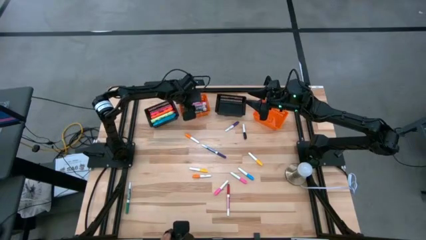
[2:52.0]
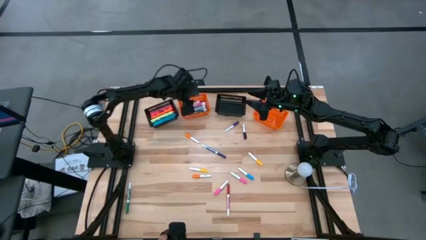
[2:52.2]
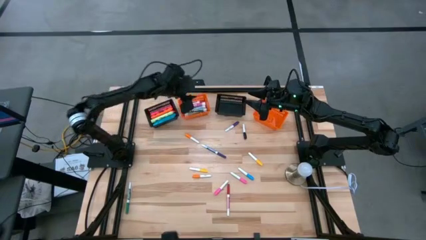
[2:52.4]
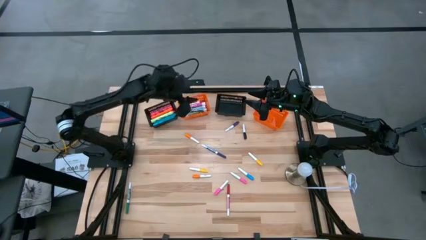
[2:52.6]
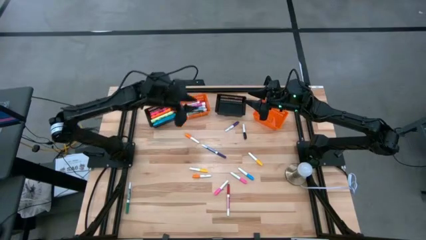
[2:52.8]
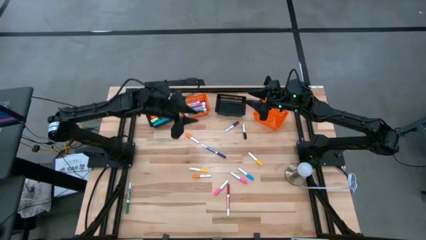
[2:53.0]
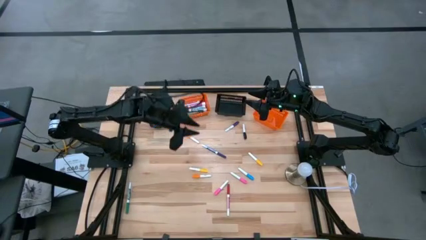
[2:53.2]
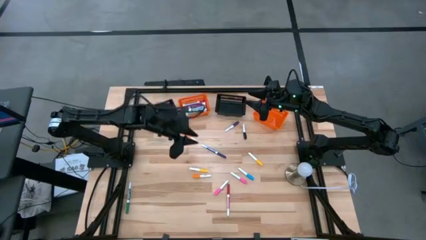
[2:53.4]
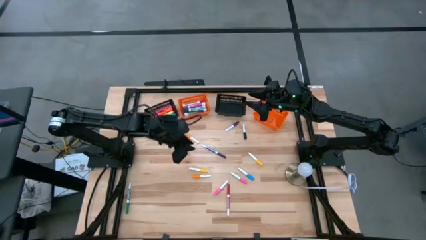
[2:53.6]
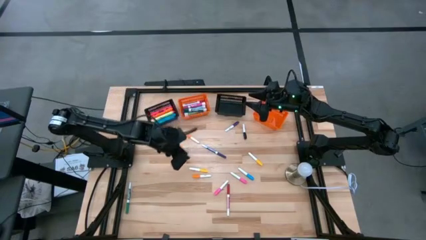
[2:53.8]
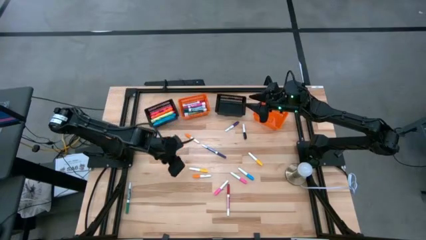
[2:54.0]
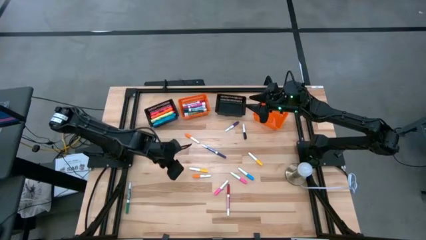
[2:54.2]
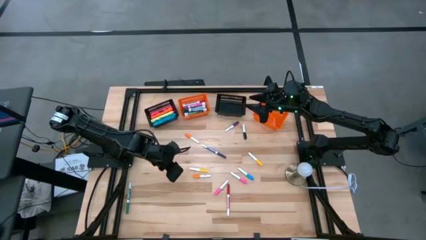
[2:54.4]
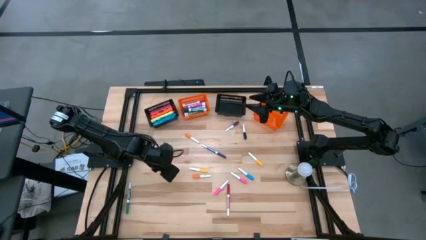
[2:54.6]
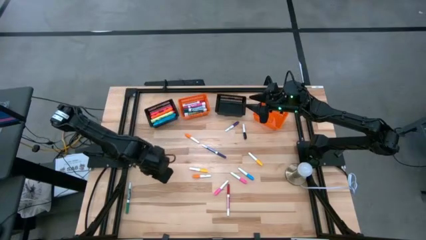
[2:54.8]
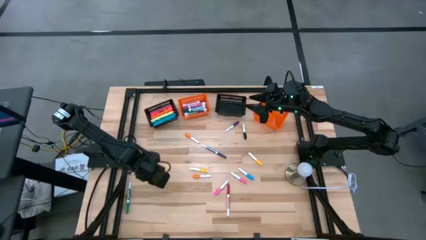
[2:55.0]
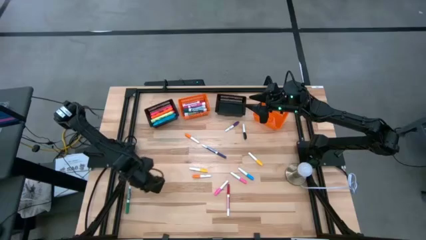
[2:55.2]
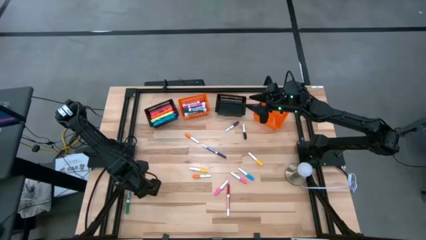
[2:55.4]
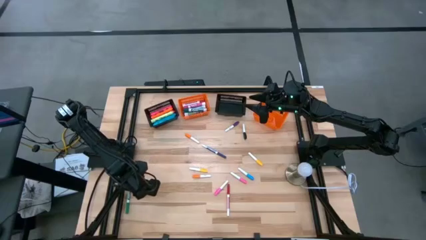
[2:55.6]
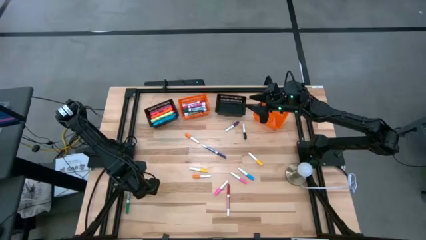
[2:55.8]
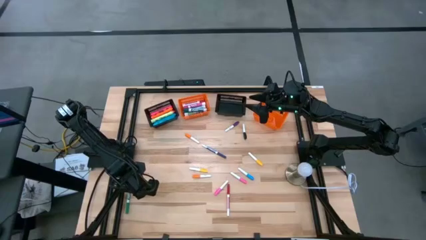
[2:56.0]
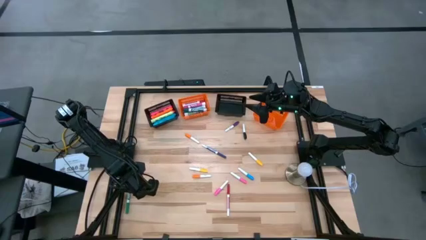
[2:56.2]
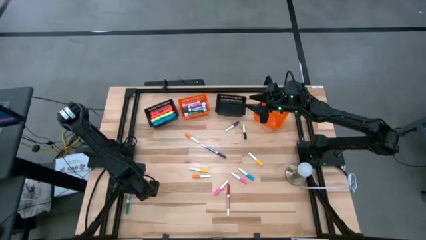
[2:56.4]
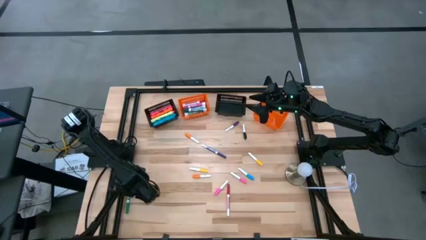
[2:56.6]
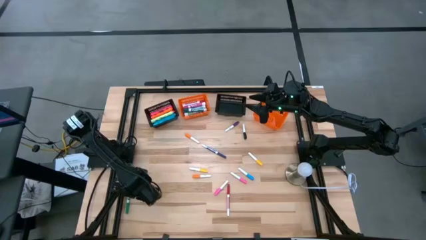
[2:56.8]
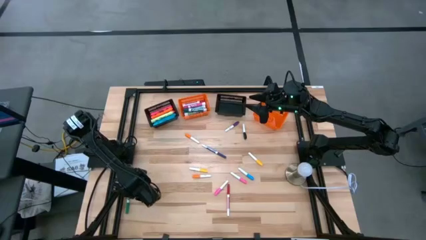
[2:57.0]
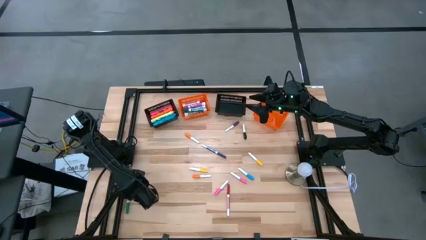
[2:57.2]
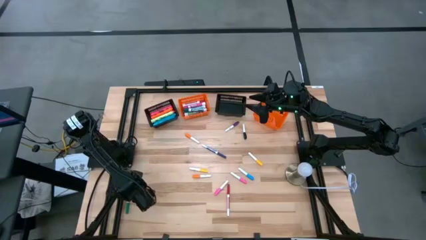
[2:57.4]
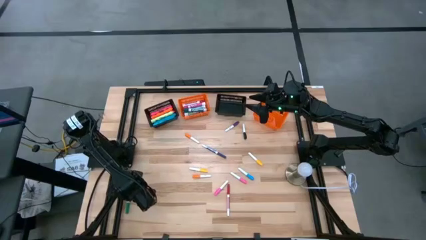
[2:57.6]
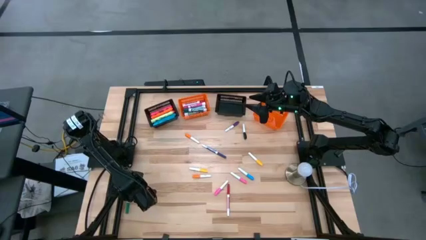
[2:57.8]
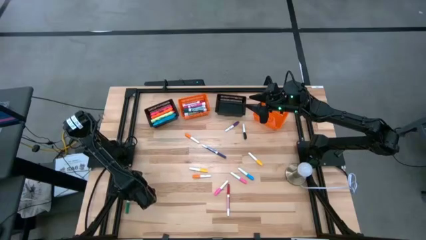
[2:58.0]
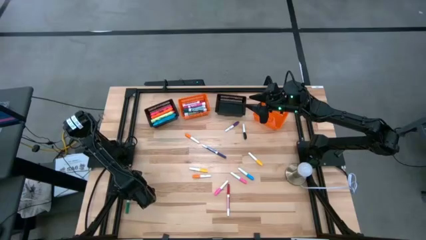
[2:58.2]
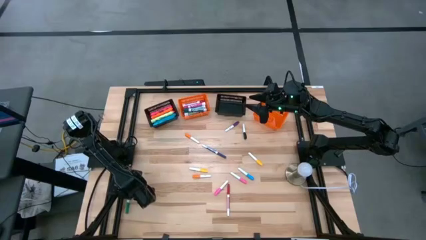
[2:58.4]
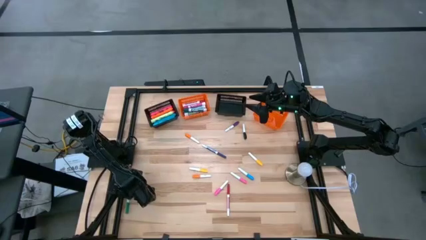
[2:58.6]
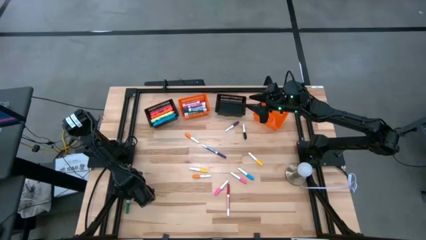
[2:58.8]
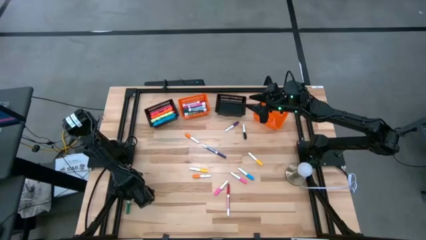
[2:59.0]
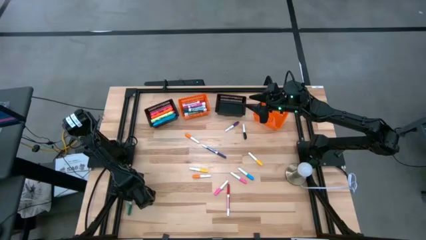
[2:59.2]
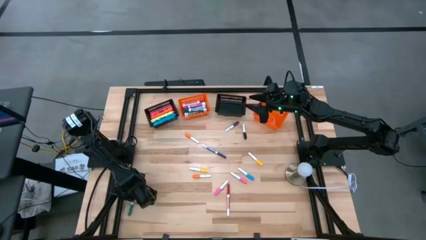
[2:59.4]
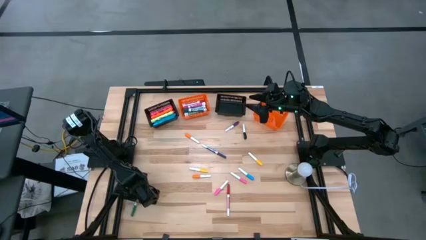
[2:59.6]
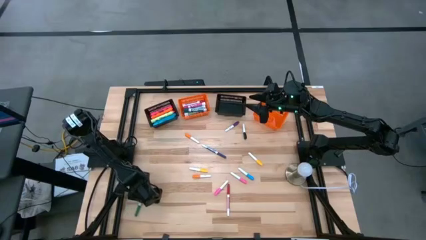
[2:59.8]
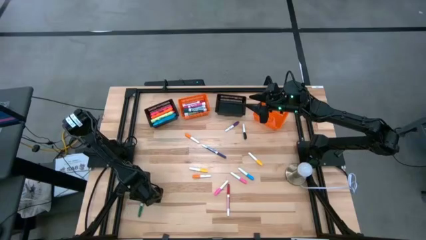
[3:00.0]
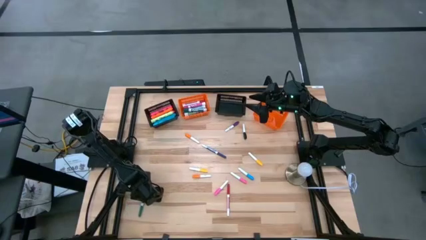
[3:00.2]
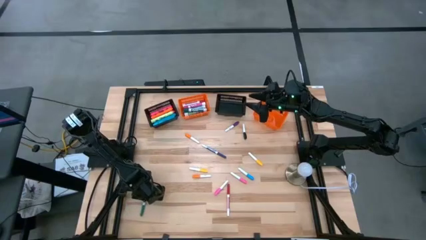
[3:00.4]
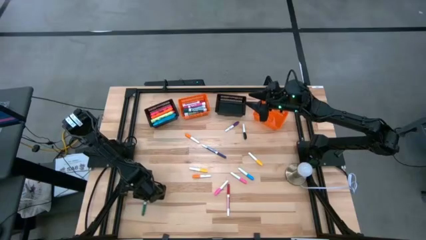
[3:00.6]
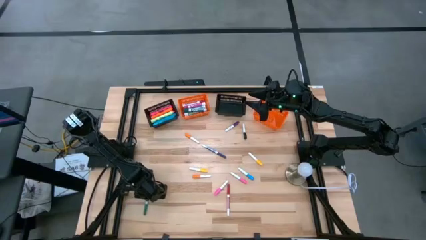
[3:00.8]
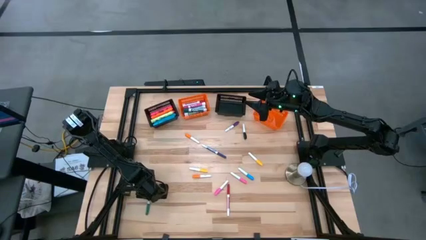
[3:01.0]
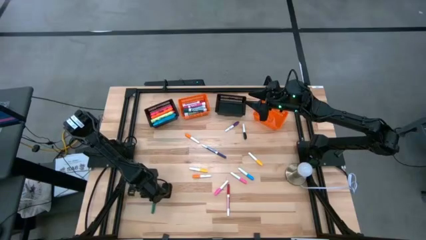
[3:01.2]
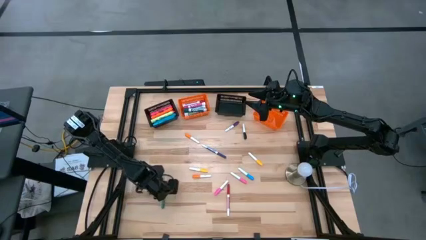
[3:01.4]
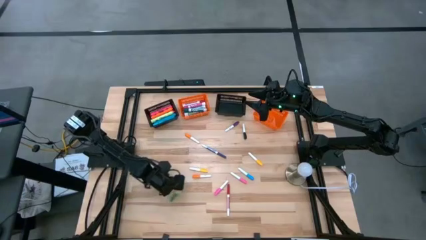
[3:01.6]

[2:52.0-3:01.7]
Task: Pick & Place Markers
Put the green marker pen into the right black bin

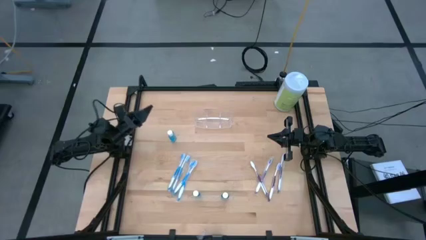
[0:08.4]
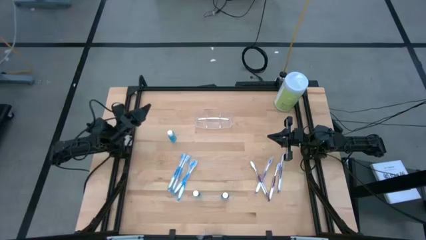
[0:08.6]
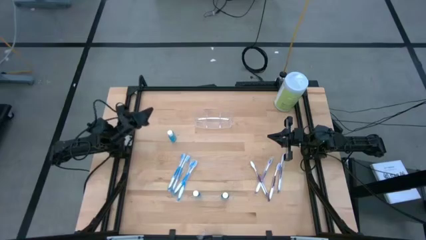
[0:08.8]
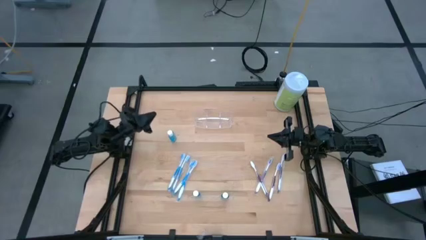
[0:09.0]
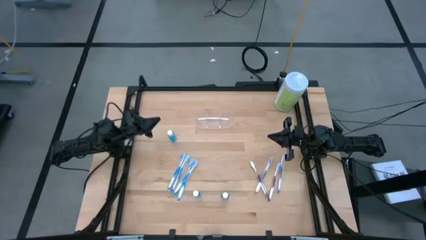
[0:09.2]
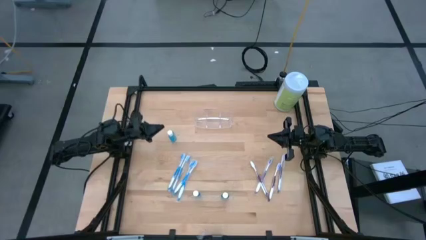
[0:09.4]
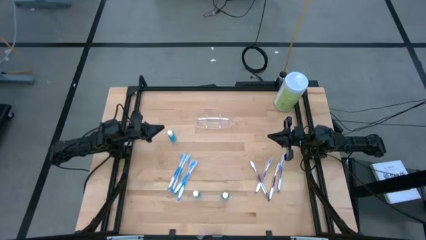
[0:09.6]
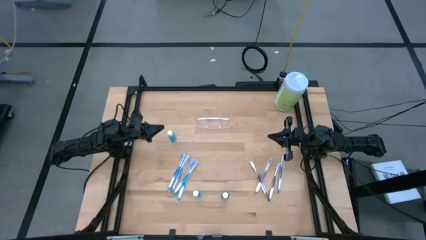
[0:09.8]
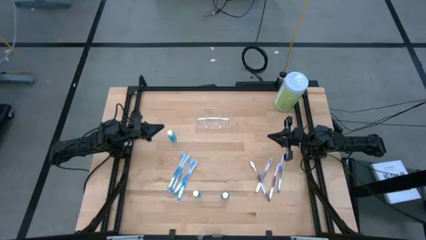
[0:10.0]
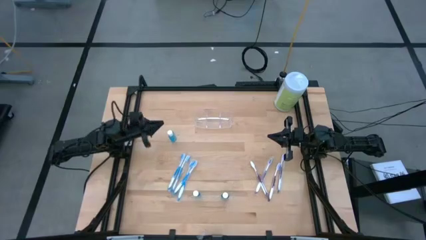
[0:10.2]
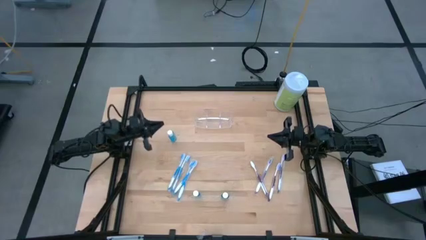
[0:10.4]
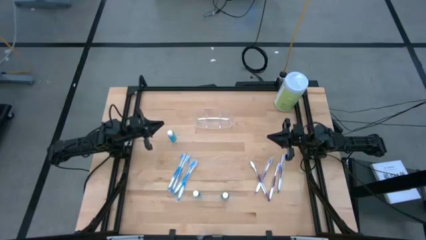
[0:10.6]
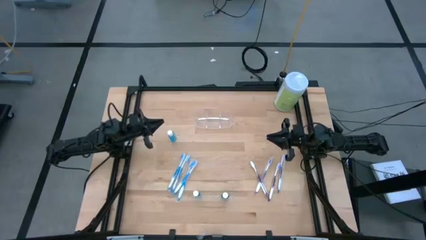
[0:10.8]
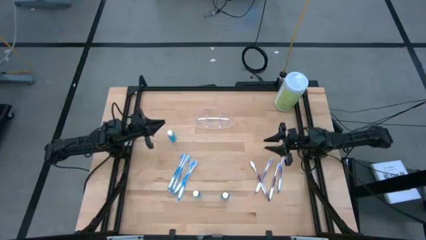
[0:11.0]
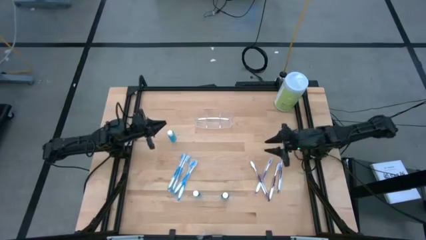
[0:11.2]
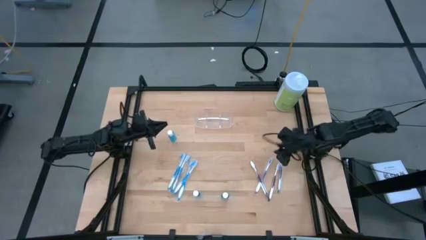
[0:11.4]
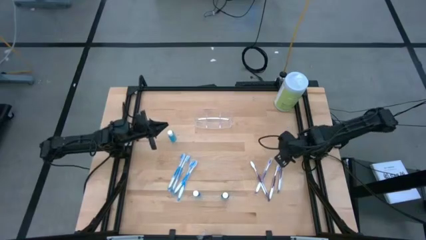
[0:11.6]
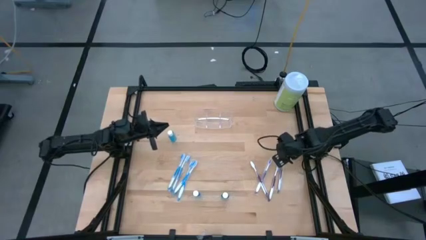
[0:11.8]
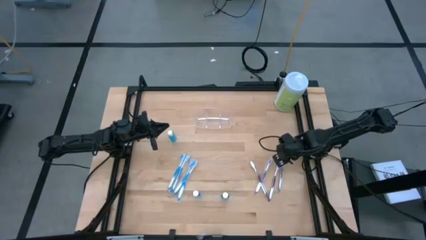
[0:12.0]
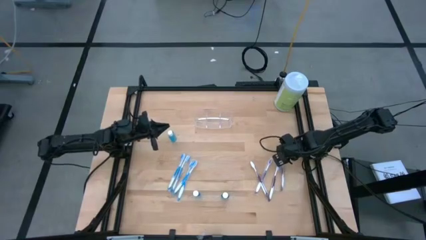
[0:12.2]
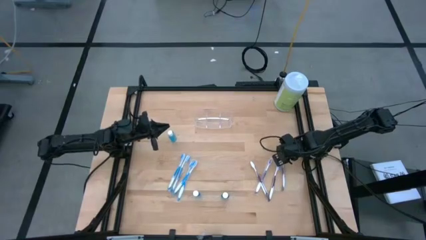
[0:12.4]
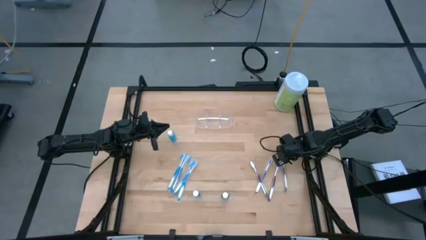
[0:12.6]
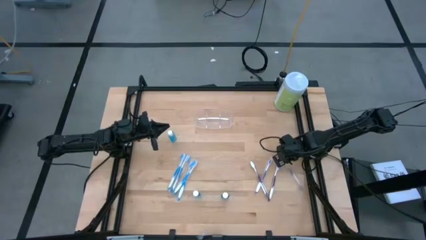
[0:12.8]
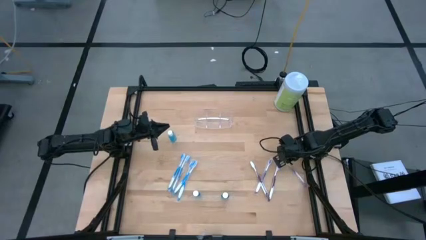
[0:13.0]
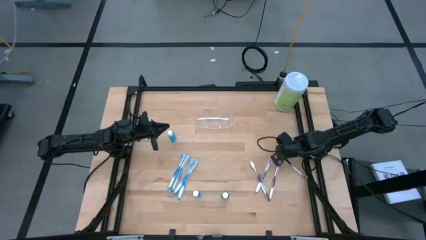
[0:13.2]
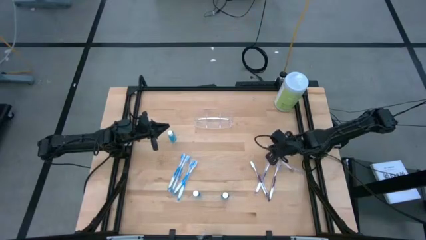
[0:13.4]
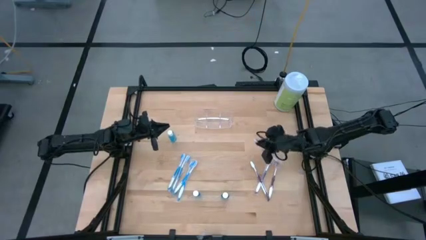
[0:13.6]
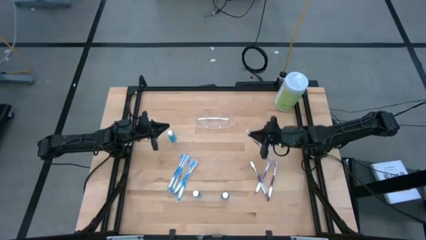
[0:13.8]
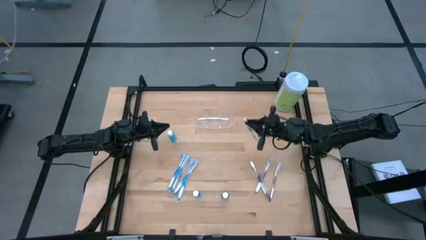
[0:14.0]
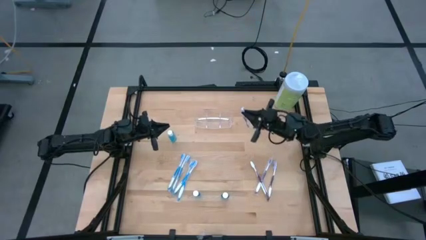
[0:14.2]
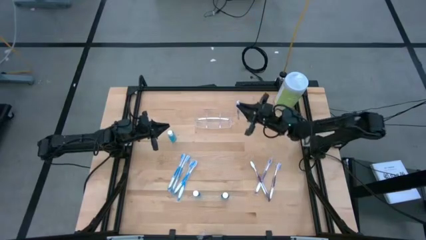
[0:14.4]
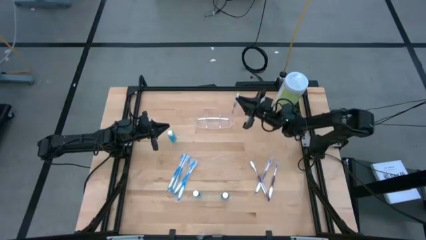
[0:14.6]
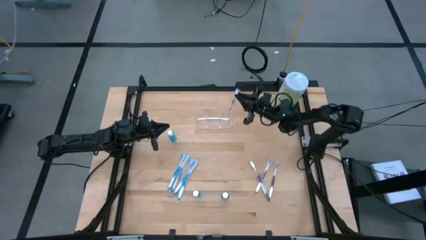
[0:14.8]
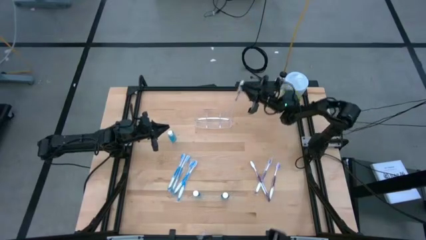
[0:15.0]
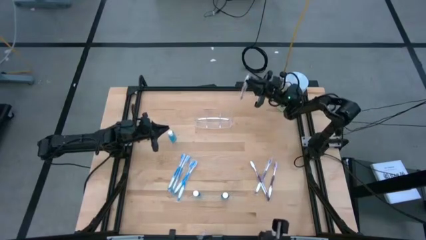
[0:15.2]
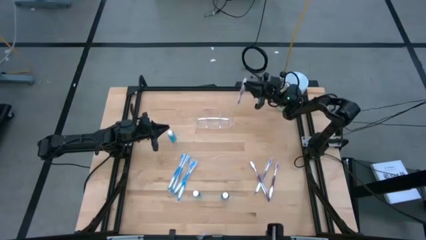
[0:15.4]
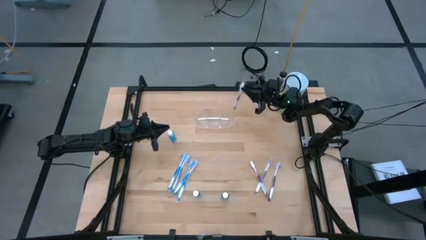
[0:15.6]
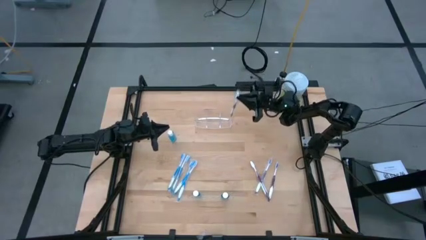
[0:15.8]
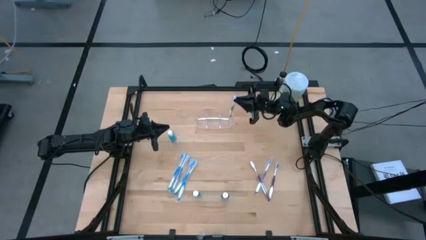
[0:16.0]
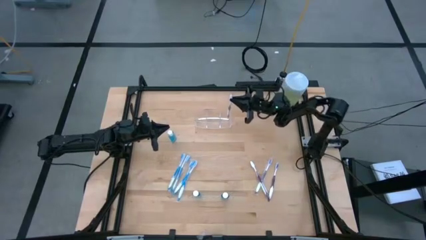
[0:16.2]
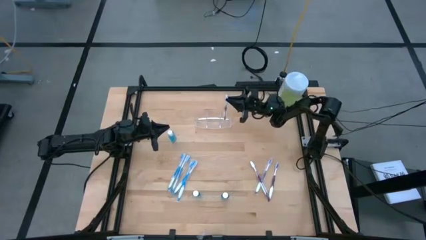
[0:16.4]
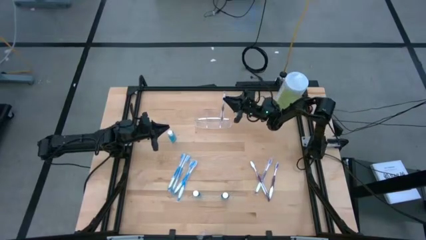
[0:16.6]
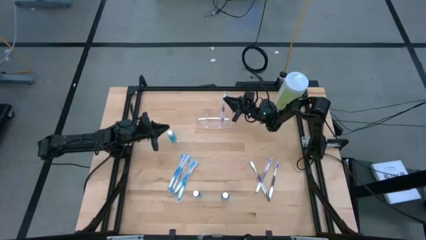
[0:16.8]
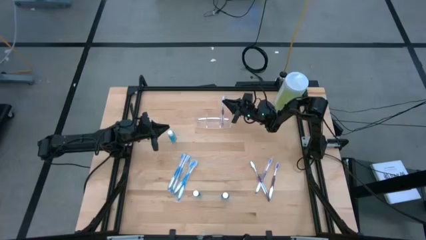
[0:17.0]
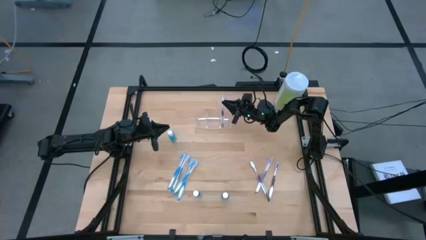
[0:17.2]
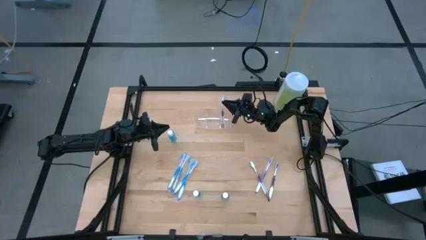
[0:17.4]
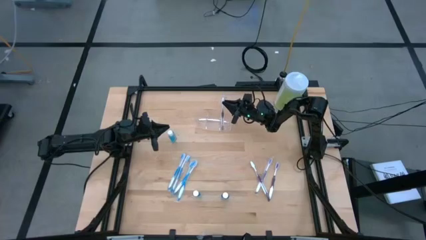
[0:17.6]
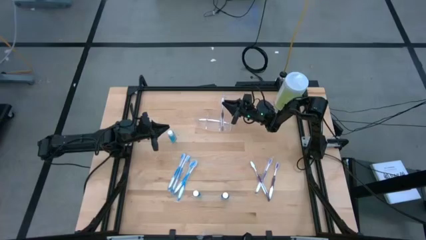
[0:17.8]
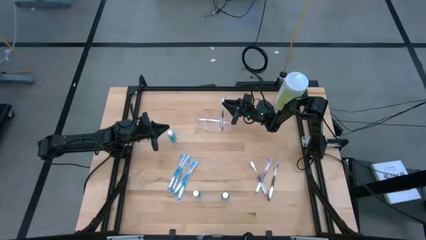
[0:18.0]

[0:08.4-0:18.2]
Task: Pick & Place toothbrushing station
Put the violet toothbrush into the transparent organizer
